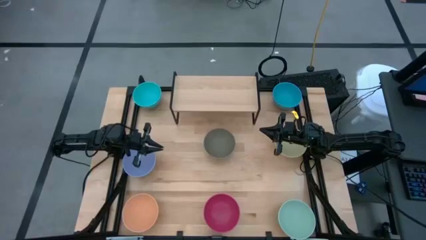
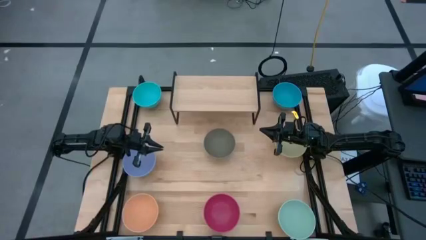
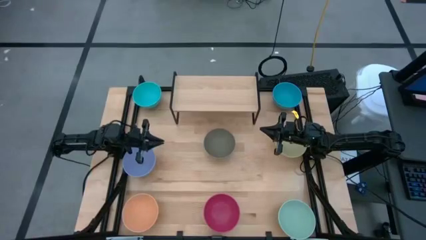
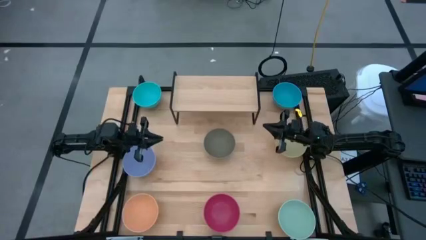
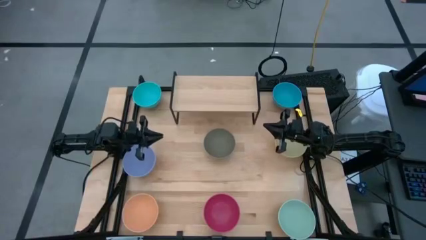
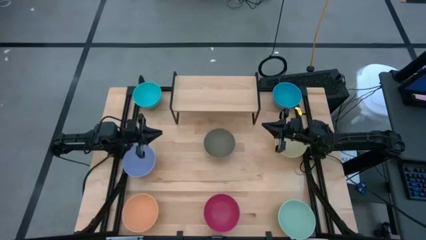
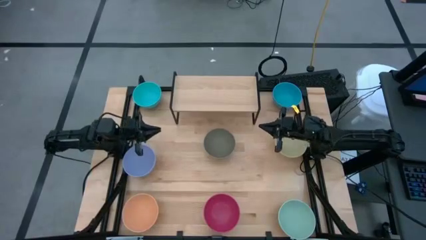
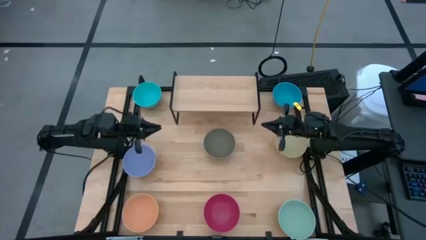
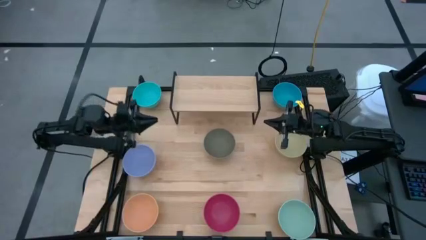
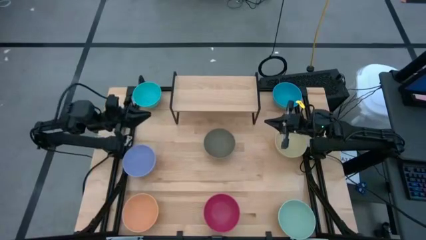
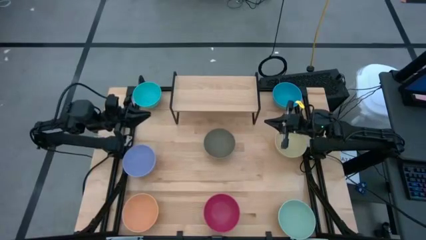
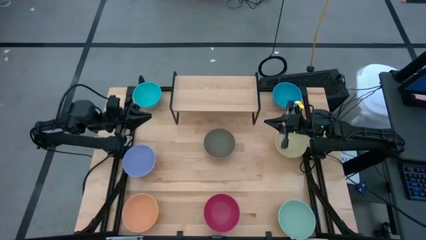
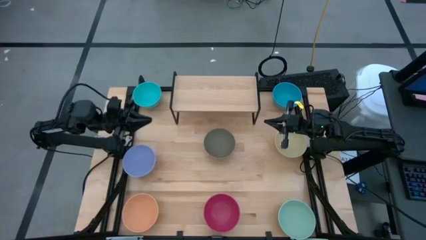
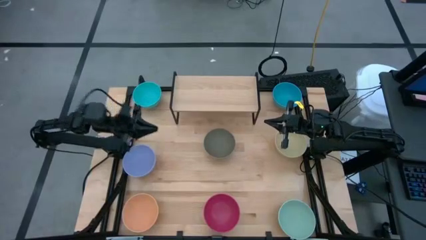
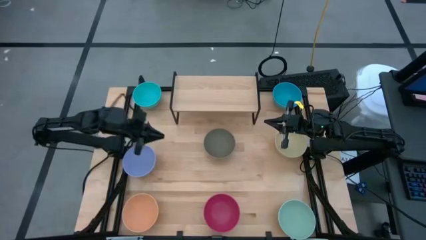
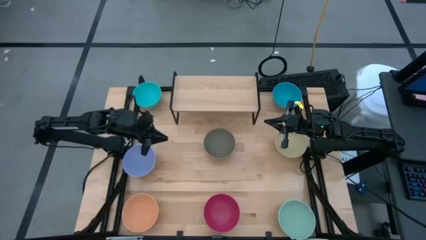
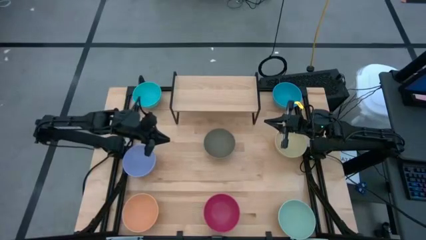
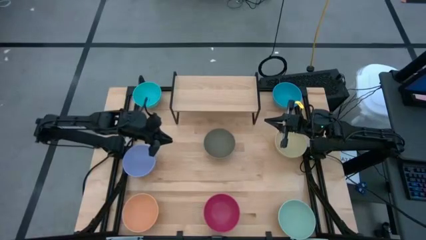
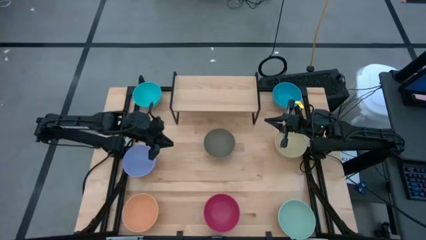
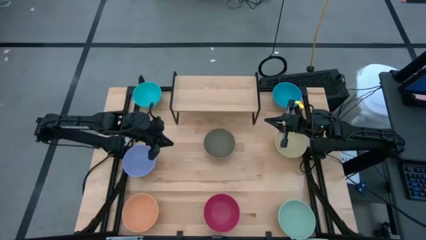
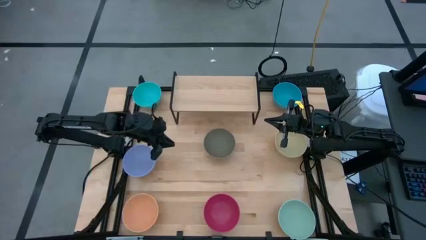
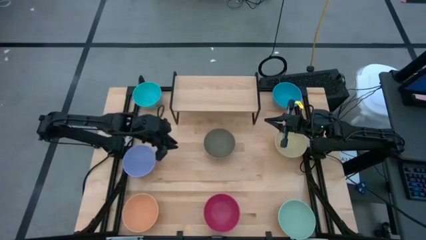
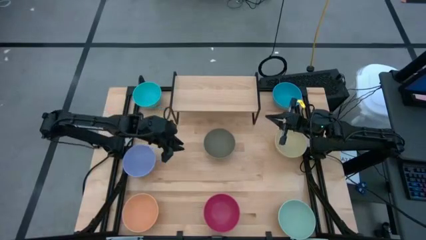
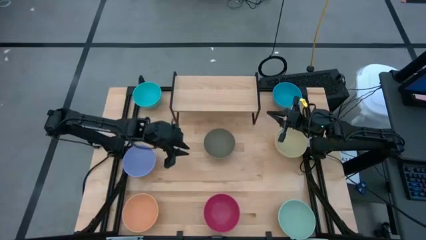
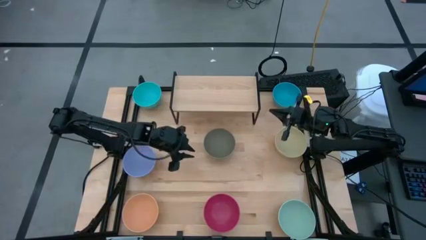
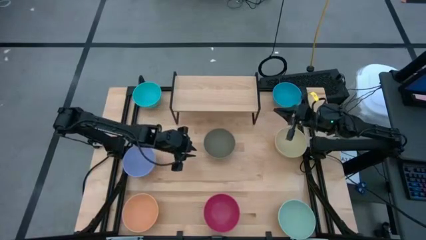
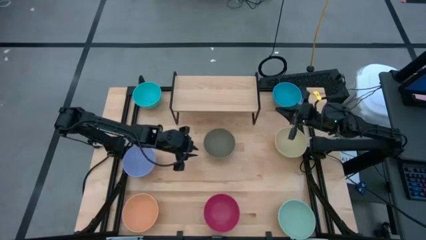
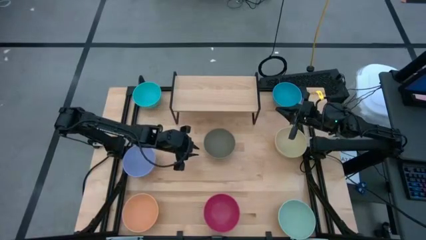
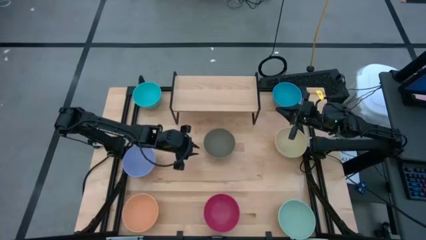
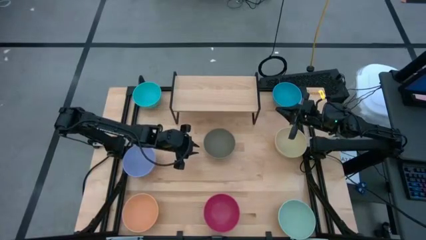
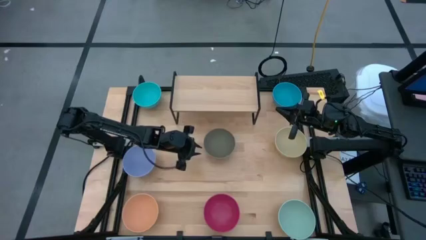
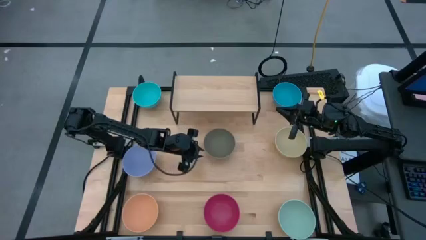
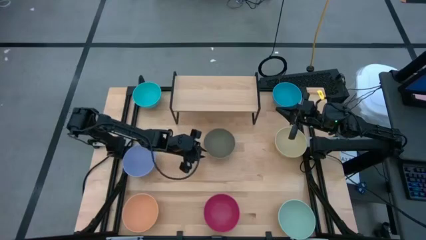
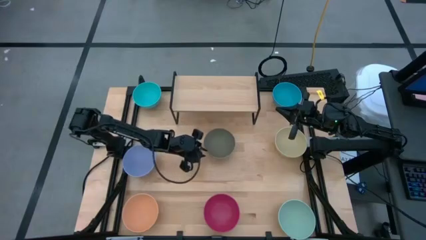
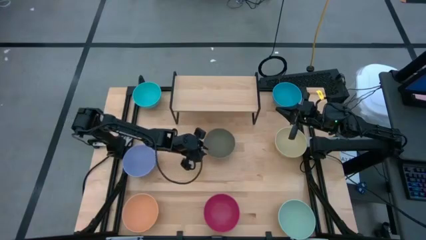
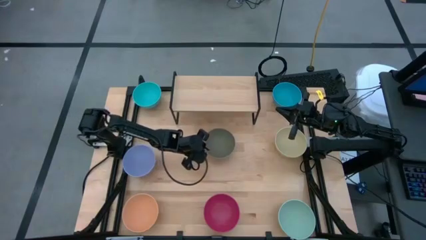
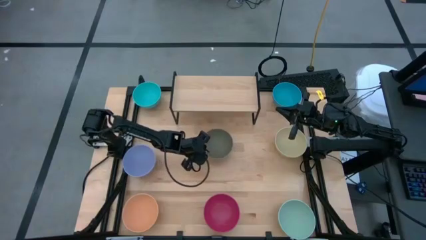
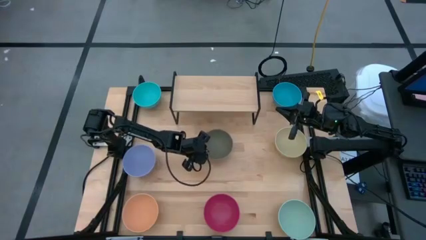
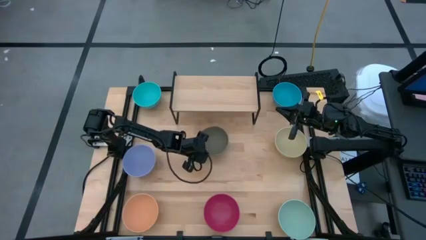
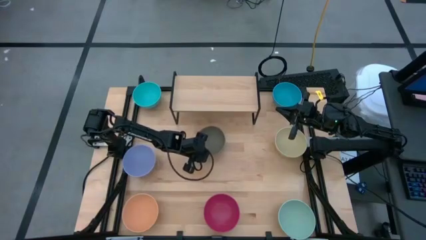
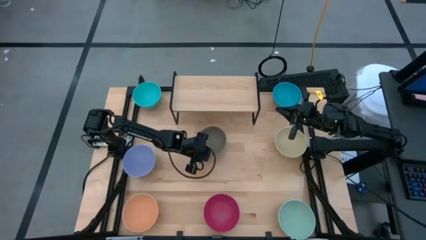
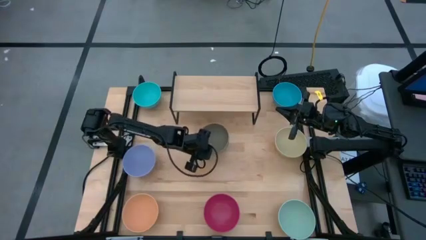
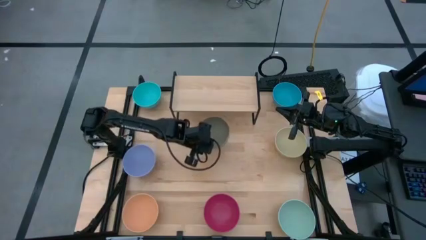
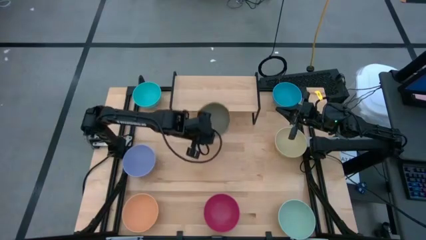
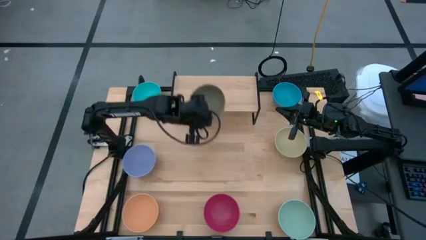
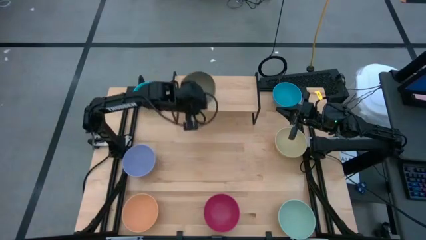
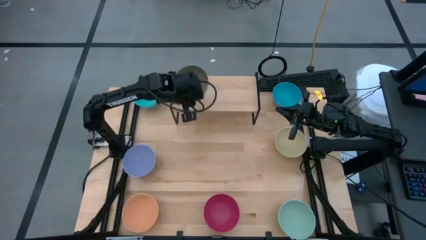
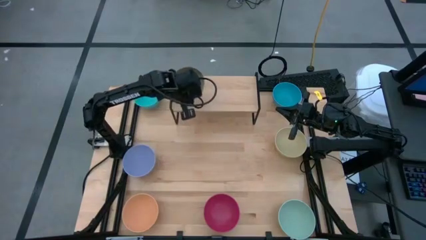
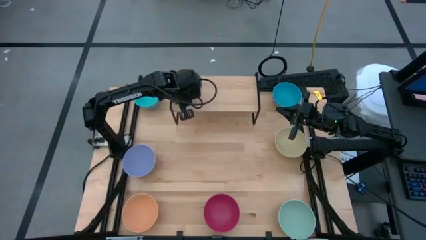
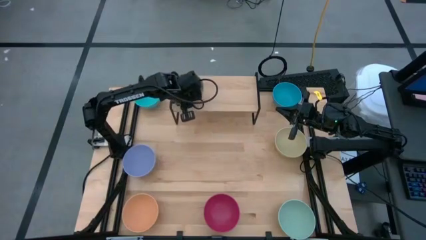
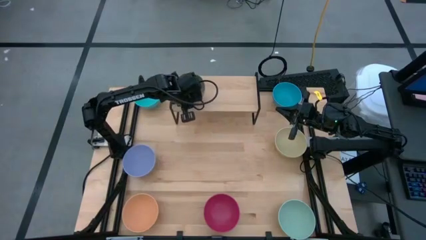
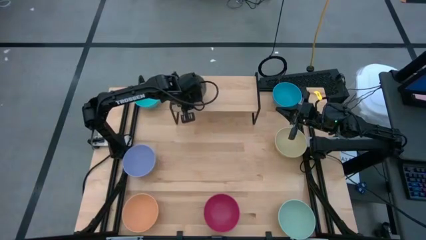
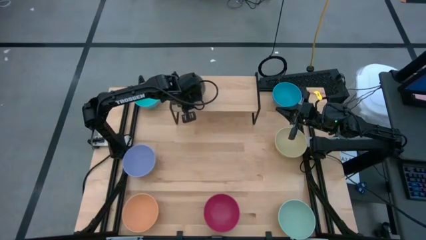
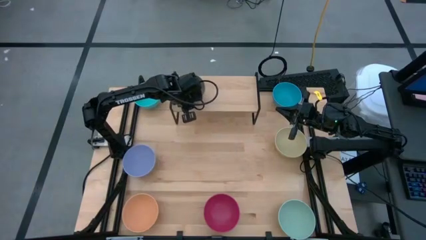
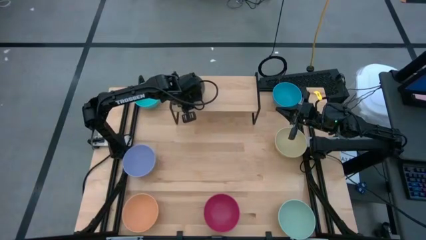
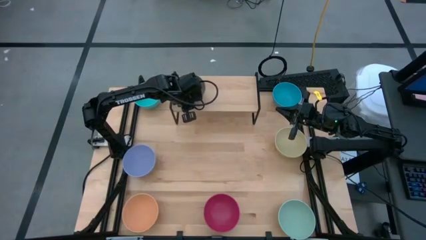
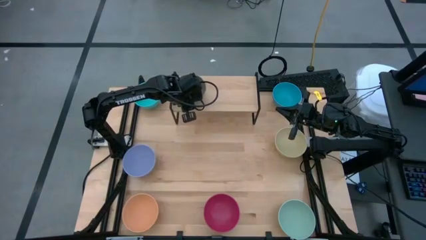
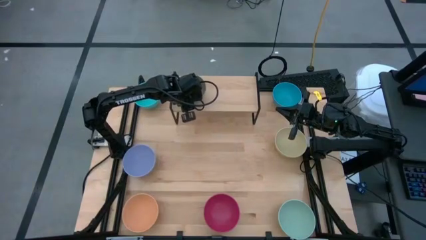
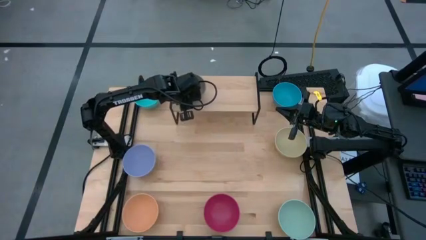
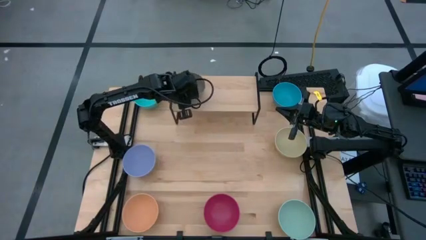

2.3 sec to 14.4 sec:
Task: Place and stack bowls onto a shelf
Put the gray bowl on the shelf

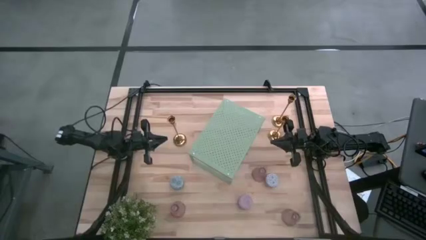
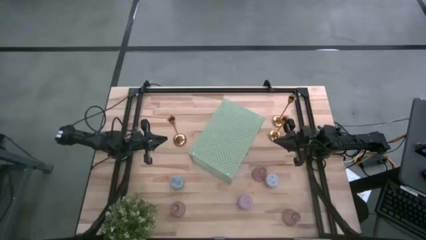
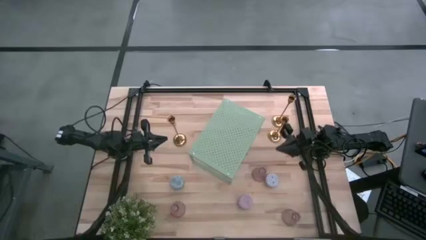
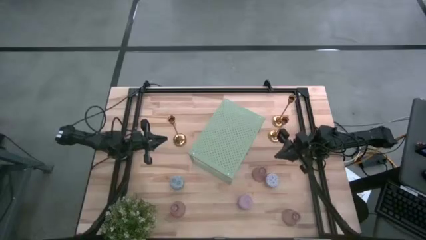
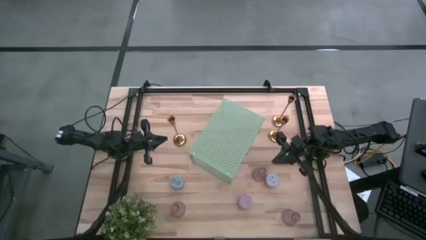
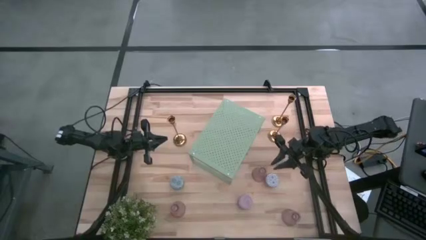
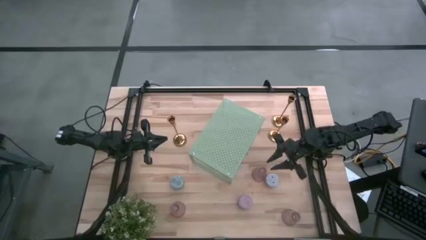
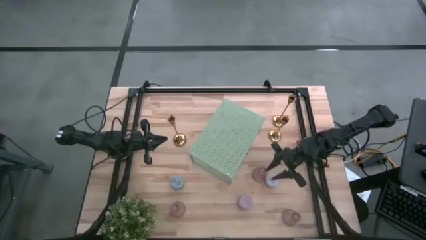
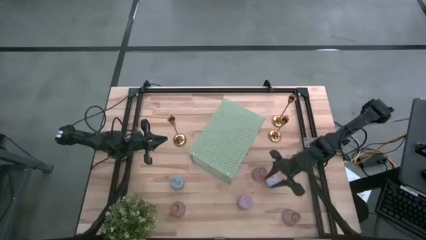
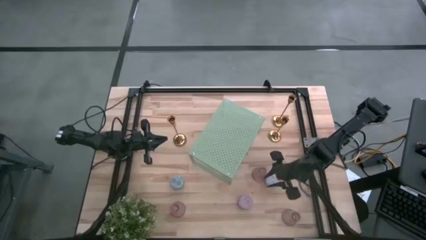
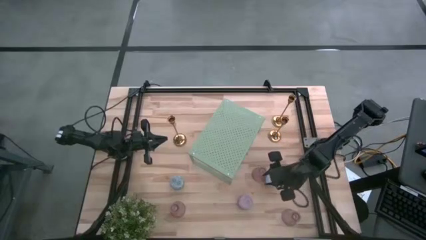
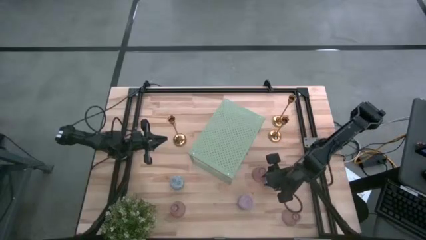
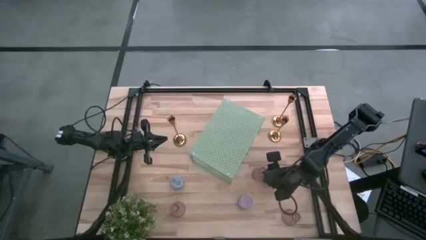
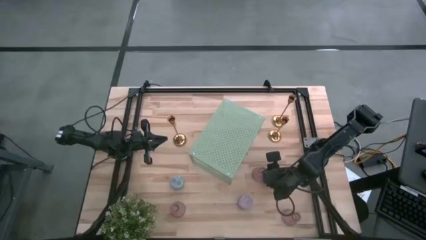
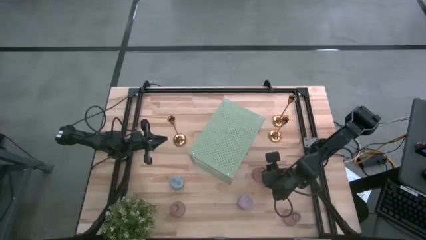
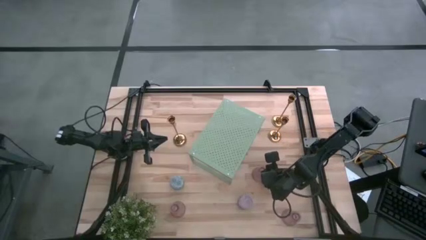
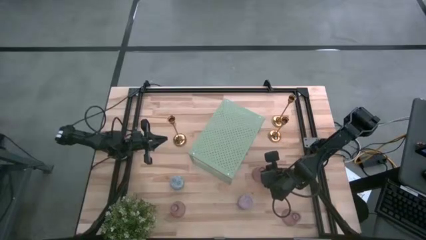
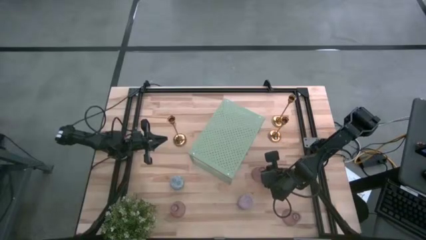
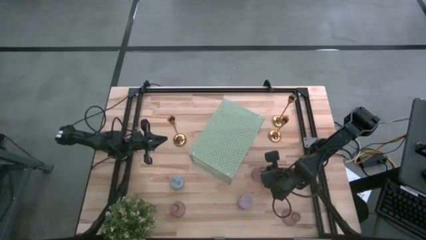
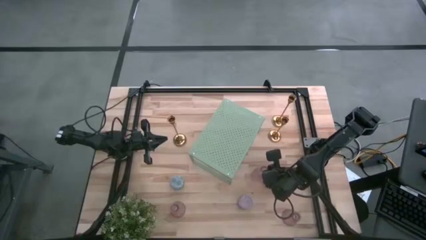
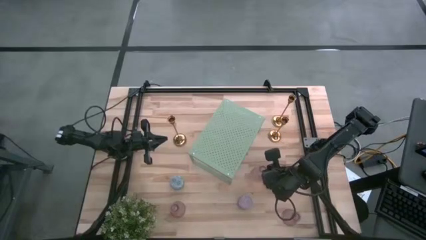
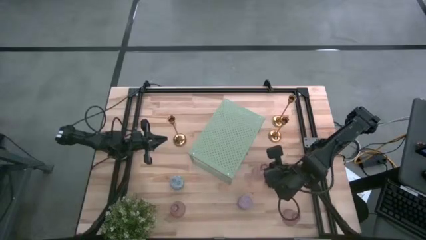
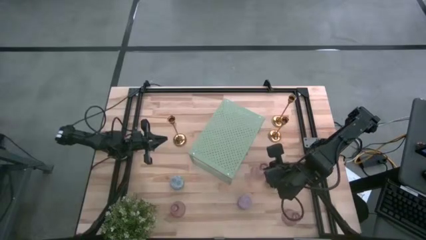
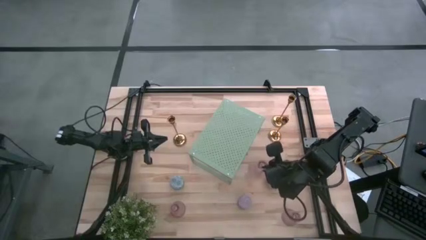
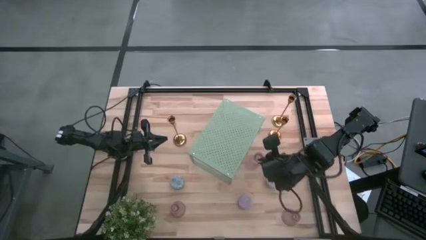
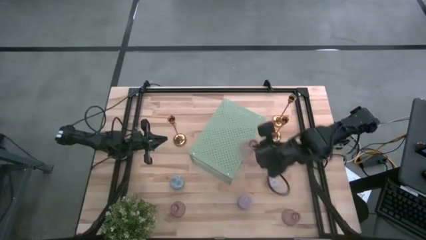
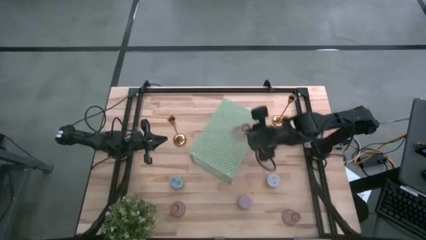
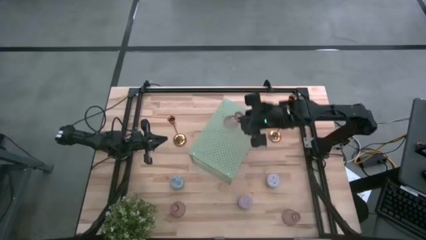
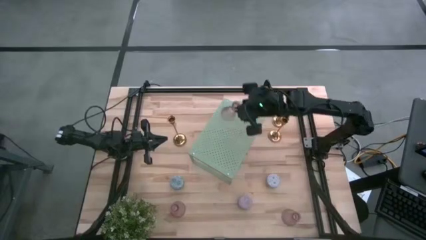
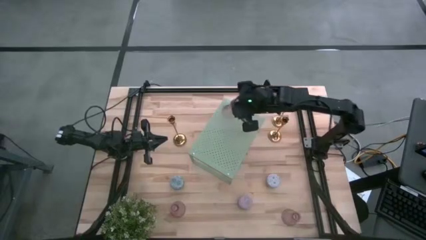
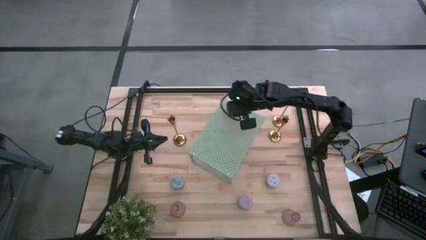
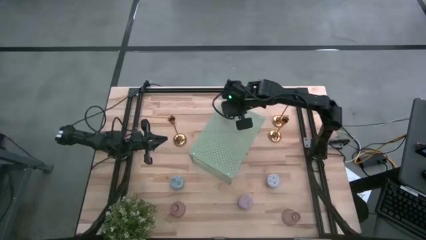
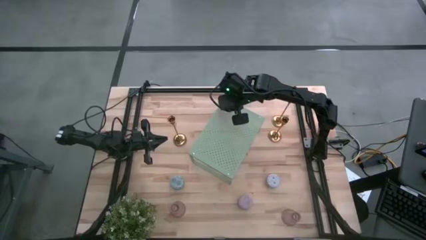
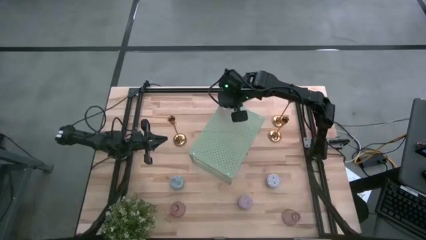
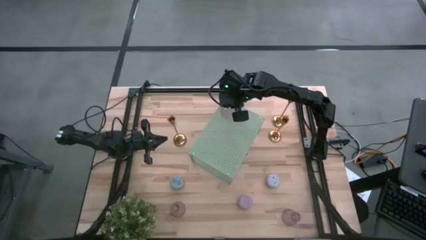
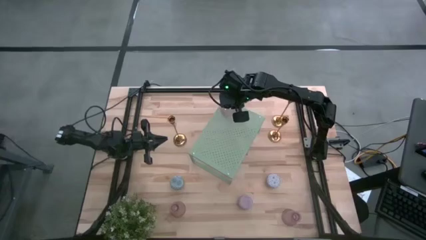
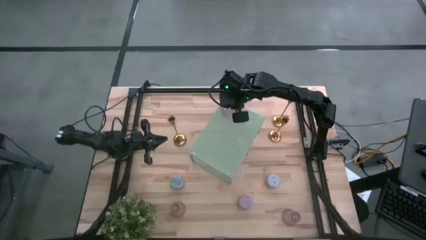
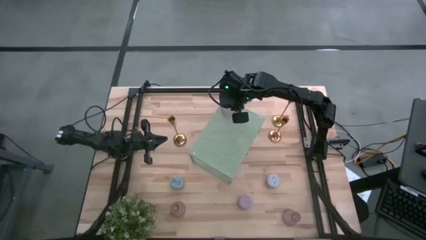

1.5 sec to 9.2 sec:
Task: Pick & Place candle stick holders
Put the top purple glass candle holder on the shelf
